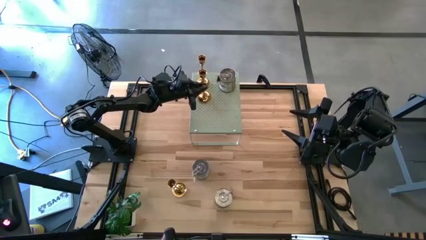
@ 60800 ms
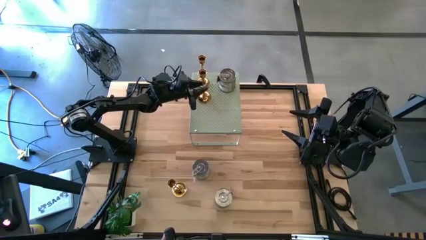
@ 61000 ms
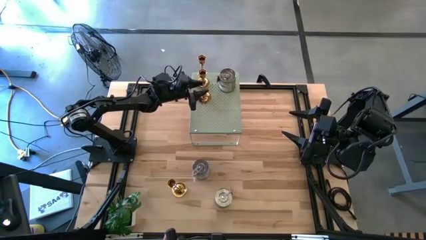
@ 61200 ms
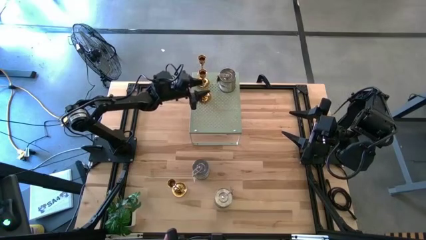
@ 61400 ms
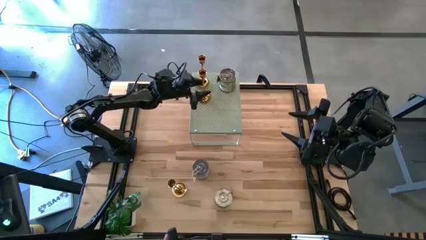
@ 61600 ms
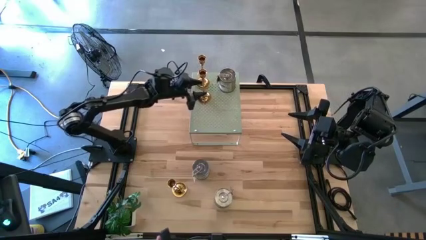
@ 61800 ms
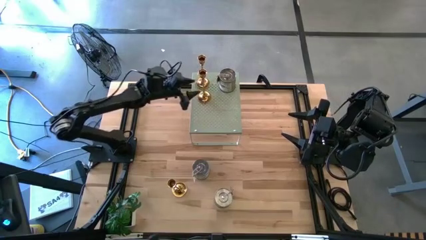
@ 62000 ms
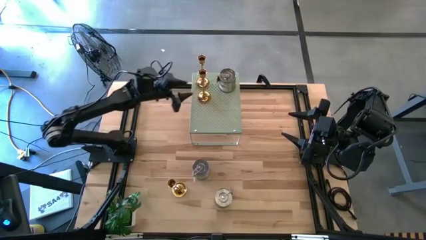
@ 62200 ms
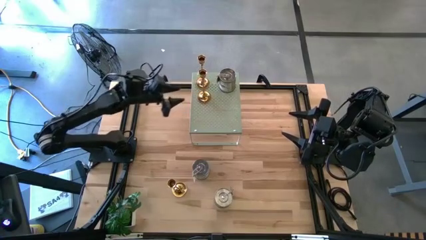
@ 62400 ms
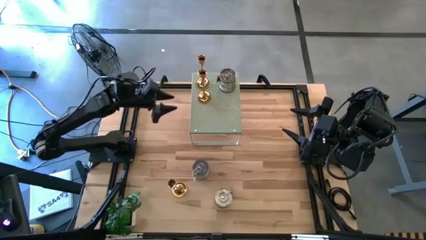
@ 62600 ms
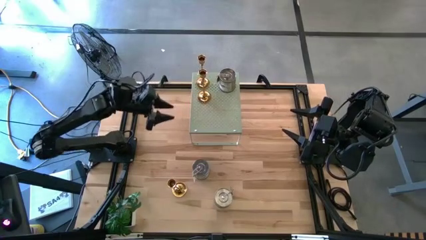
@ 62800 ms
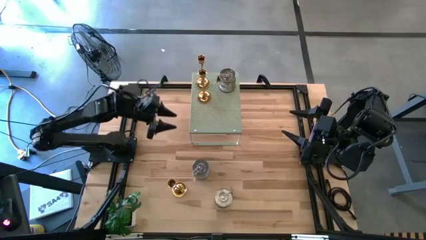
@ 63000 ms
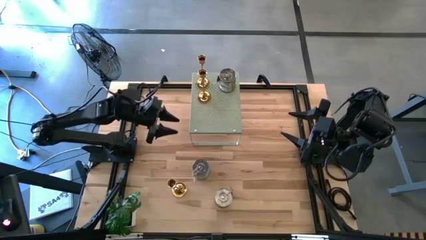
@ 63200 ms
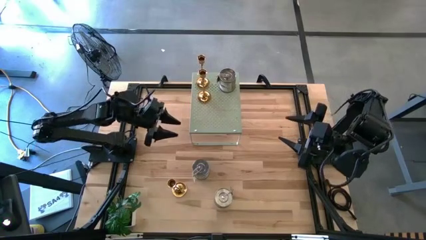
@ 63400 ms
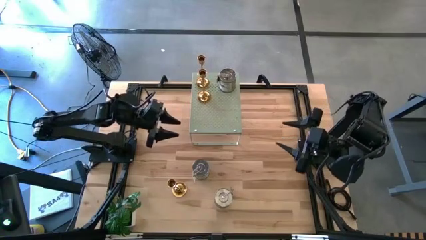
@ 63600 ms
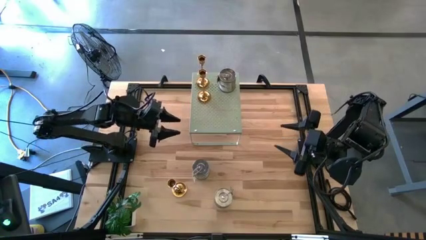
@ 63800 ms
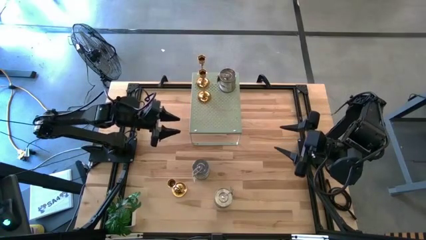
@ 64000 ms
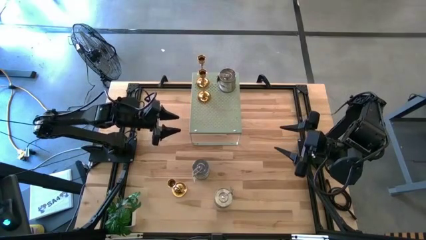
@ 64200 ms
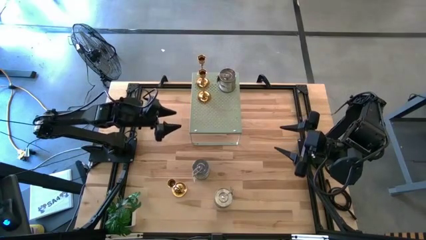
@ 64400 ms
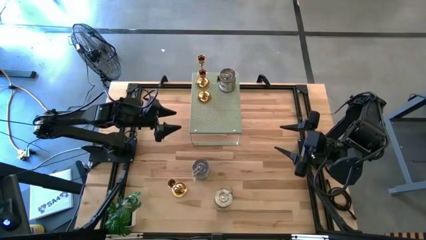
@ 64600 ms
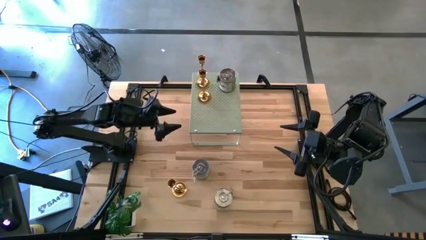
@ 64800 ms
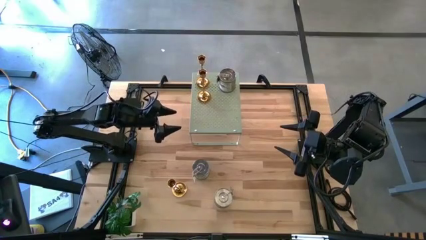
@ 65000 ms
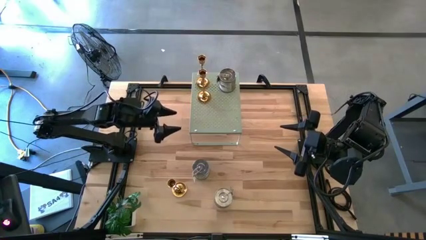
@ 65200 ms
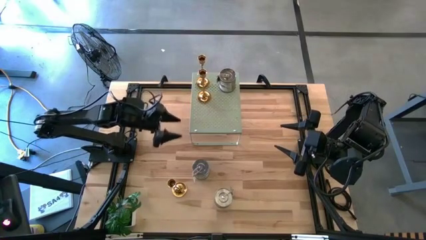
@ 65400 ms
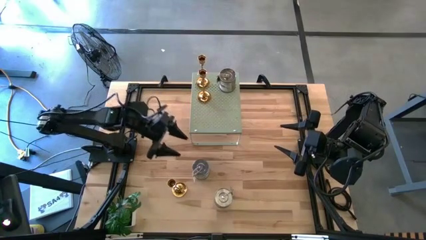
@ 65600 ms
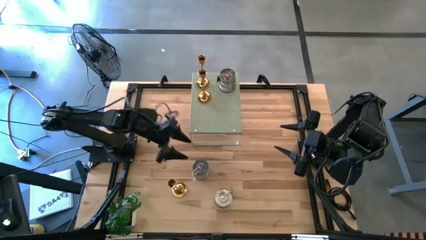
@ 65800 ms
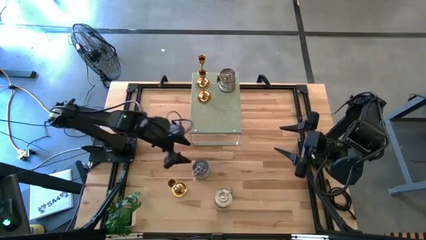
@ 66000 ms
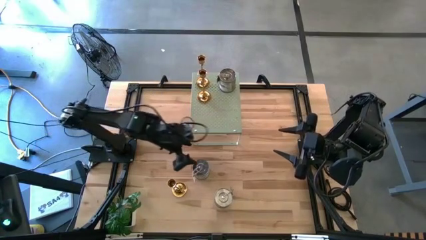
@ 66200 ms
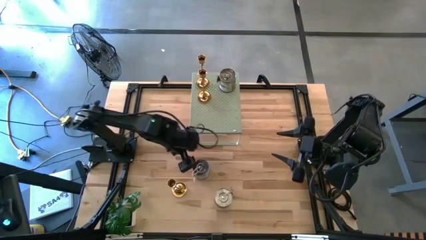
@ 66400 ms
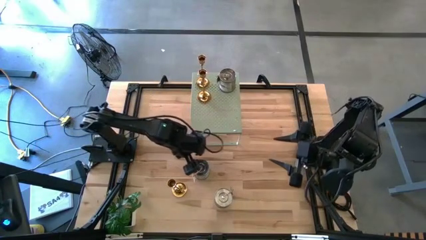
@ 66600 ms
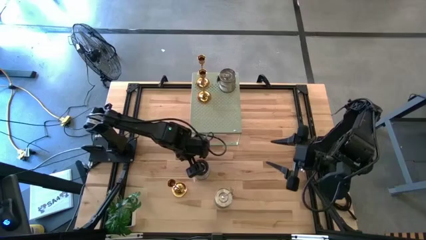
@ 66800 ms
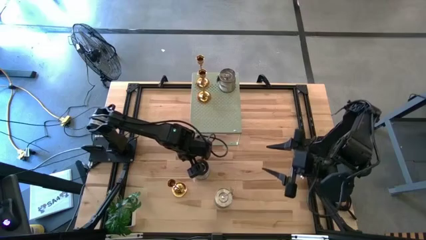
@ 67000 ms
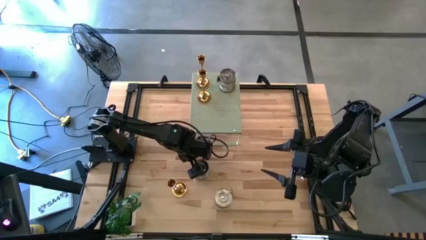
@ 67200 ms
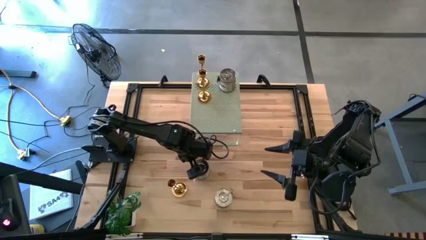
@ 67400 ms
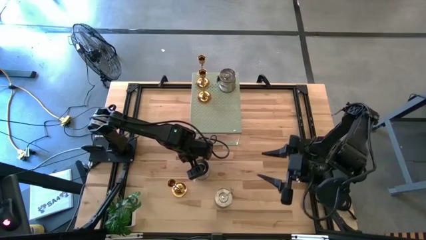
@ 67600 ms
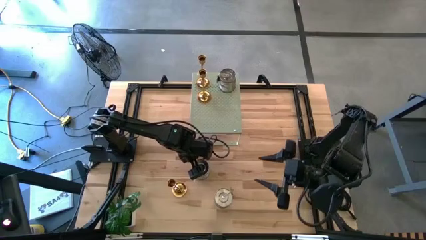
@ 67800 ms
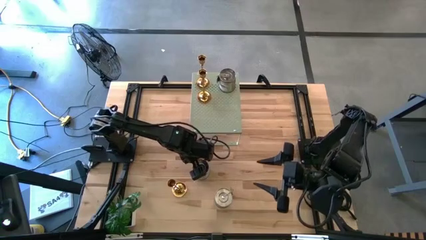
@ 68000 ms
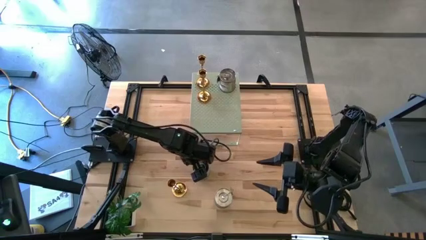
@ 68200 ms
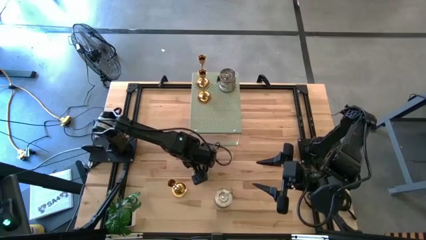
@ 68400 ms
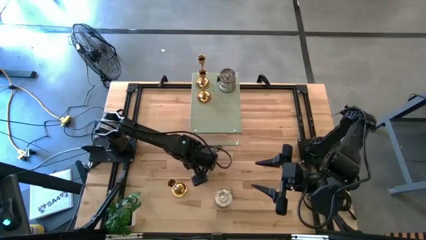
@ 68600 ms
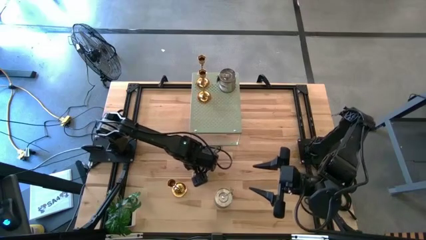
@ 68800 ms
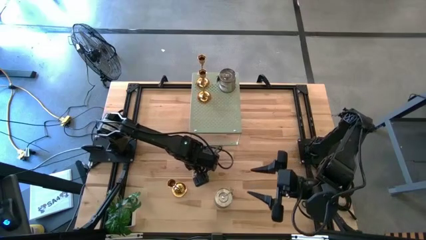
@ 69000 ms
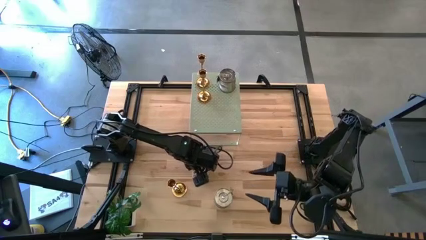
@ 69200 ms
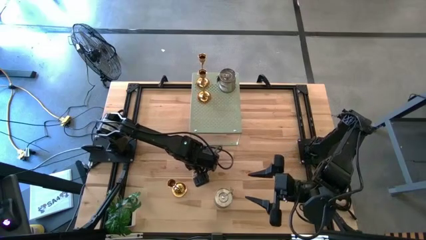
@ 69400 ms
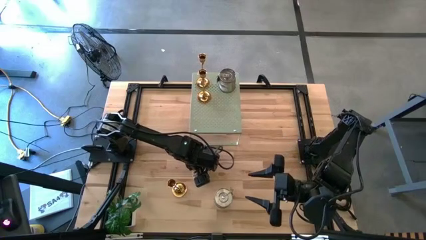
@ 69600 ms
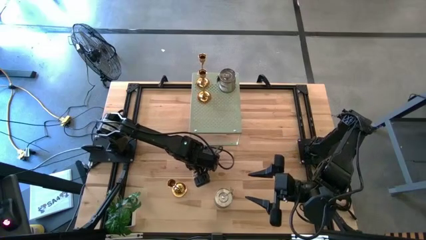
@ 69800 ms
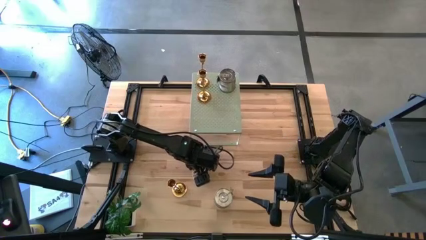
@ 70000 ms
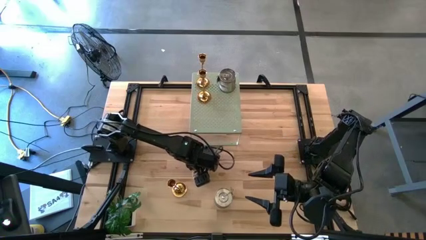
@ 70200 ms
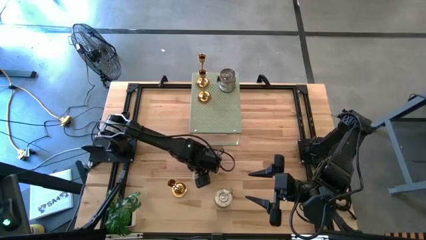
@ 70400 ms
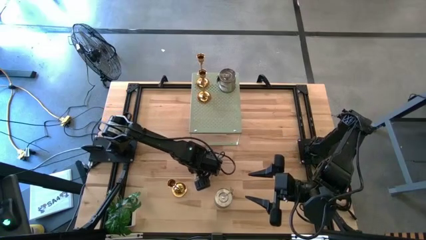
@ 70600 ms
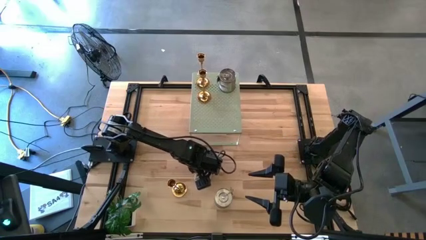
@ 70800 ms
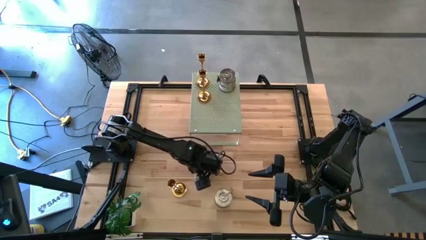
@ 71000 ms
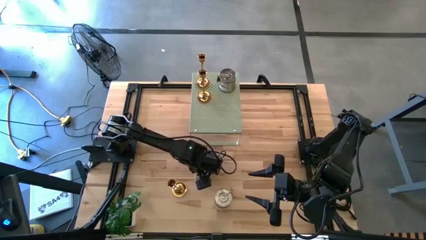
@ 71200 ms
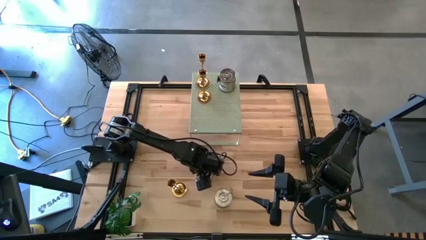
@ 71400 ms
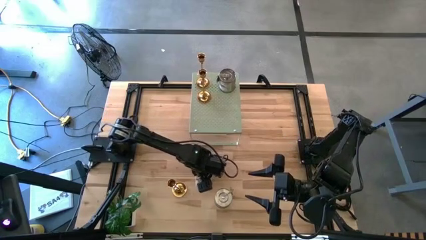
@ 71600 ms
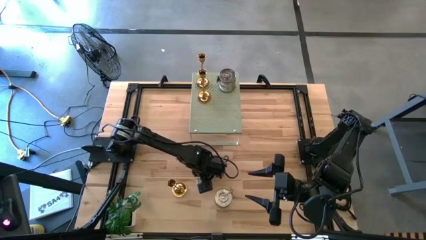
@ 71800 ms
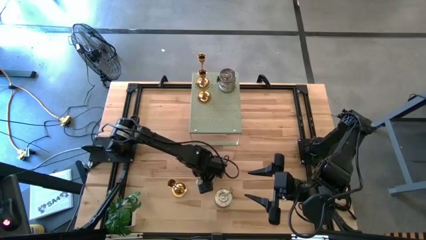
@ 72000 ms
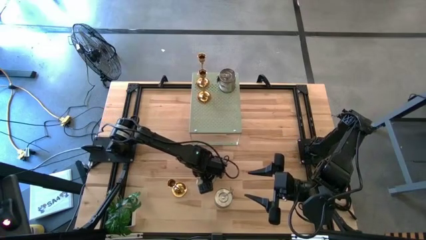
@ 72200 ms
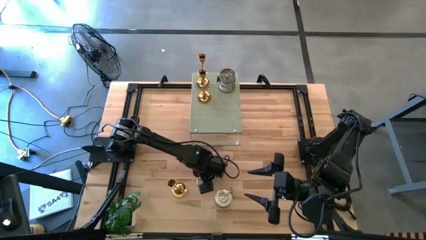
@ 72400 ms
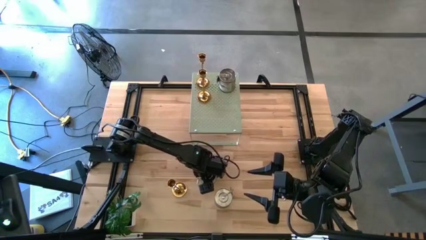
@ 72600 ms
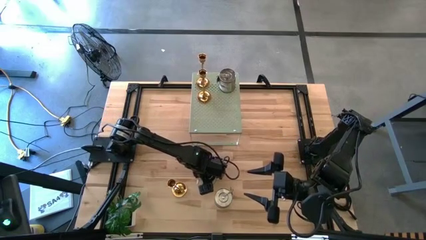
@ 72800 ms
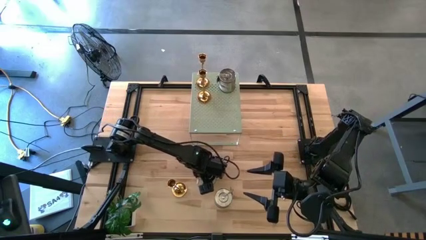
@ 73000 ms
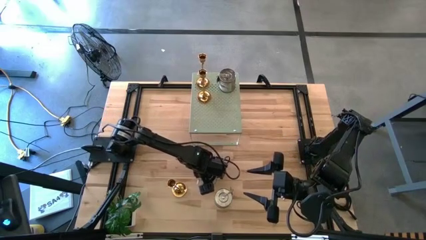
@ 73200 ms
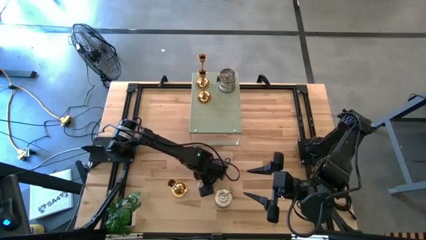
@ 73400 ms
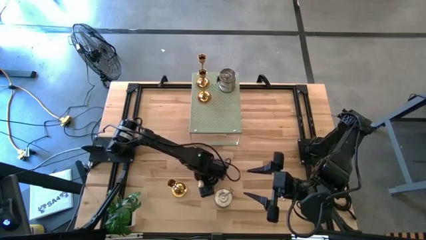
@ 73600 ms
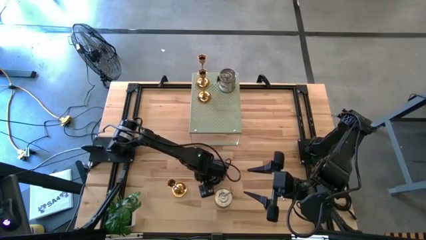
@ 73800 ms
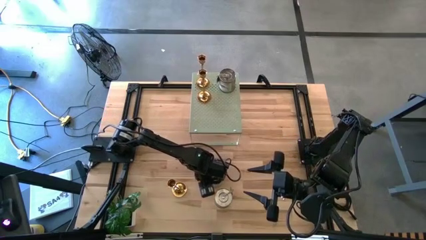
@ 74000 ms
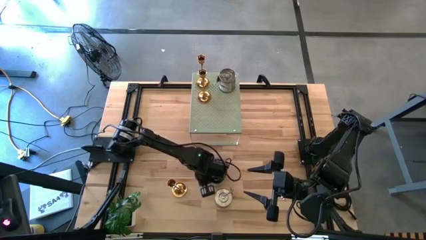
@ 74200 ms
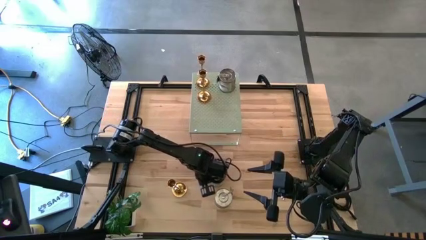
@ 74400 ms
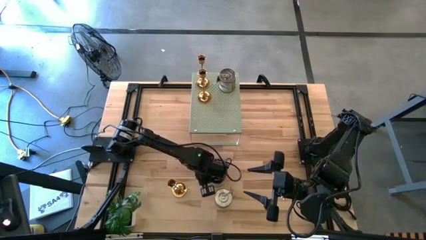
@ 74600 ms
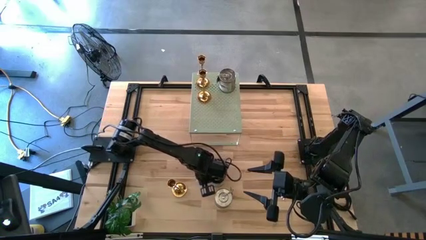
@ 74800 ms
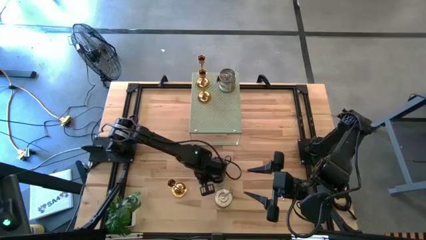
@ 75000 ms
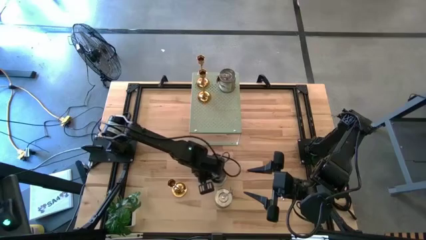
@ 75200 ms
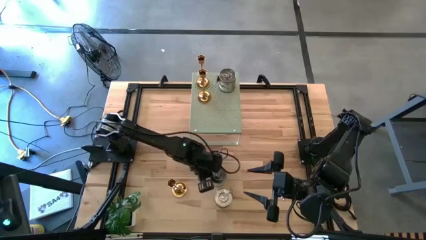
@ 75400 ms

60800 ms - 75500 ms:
Task: Pick & Place candle stick holders
Put the green scented candle on the shelf aligned with the other green scented candle
